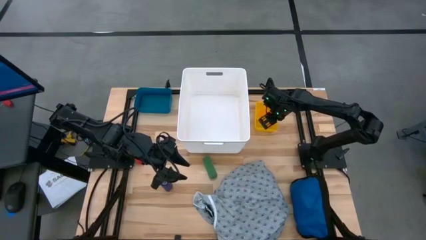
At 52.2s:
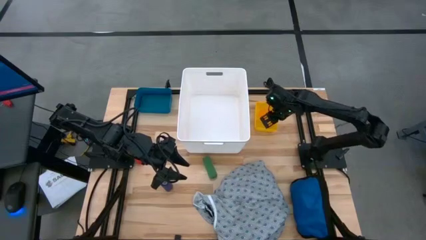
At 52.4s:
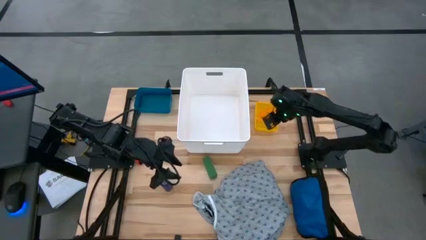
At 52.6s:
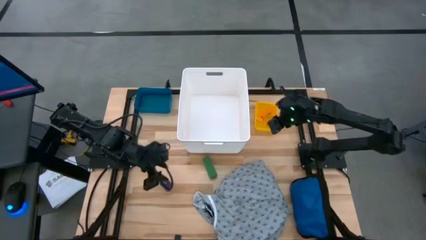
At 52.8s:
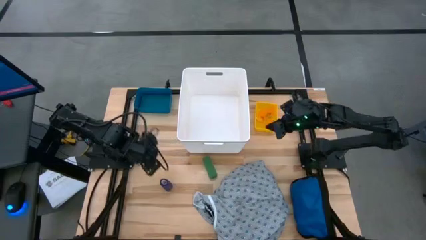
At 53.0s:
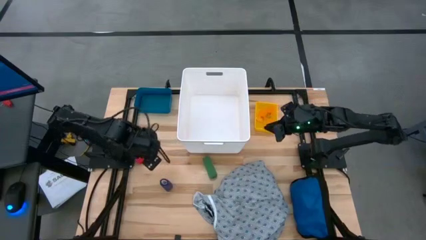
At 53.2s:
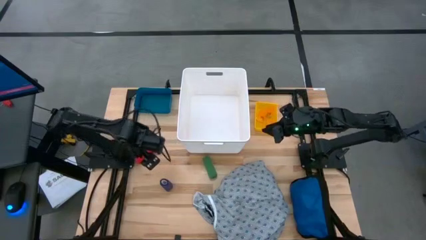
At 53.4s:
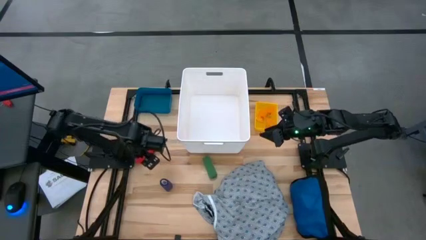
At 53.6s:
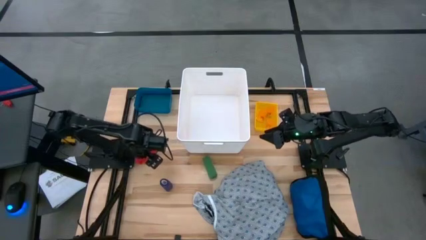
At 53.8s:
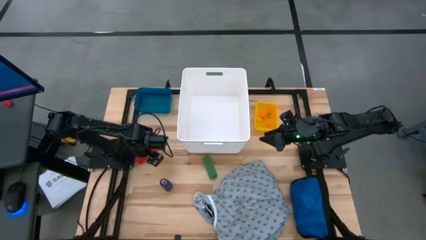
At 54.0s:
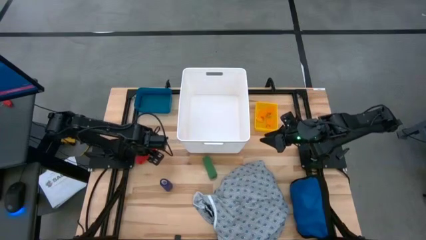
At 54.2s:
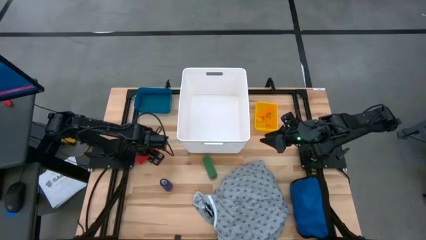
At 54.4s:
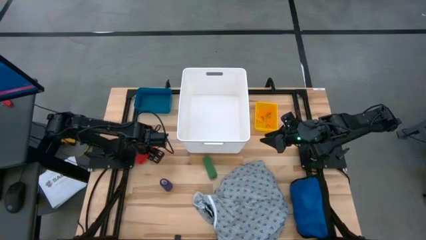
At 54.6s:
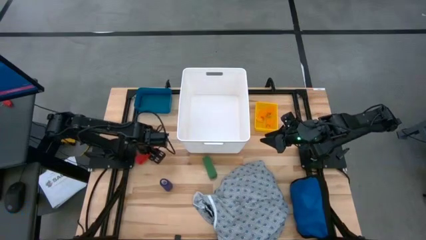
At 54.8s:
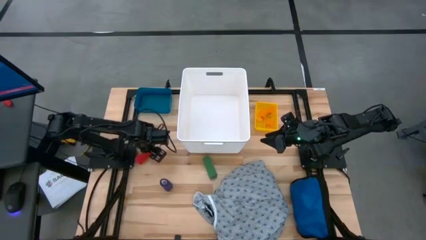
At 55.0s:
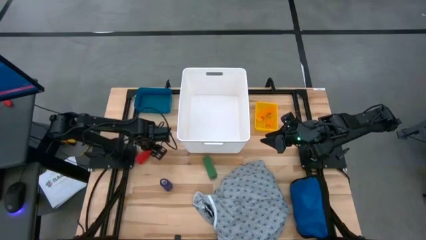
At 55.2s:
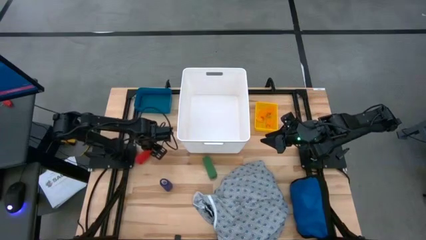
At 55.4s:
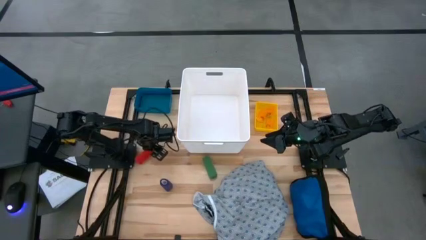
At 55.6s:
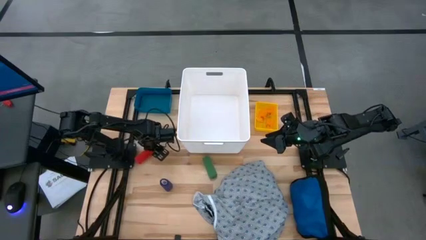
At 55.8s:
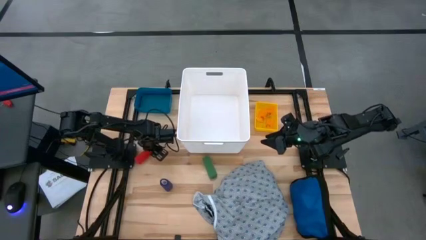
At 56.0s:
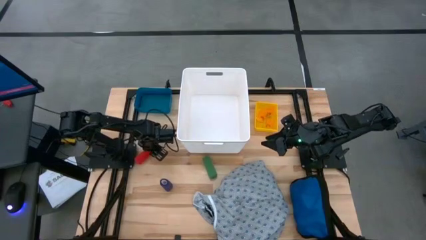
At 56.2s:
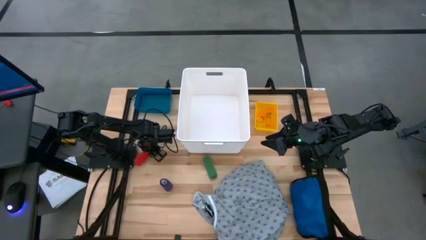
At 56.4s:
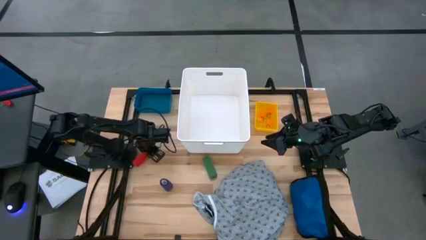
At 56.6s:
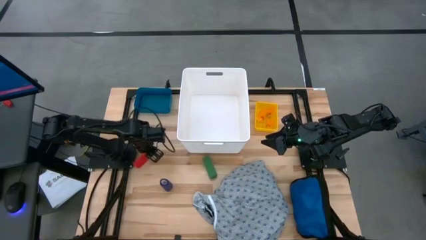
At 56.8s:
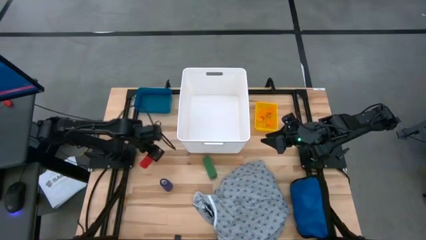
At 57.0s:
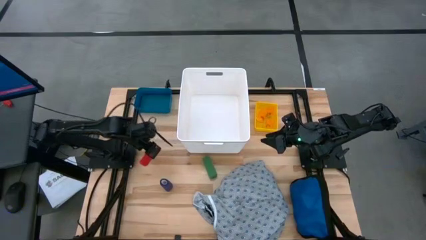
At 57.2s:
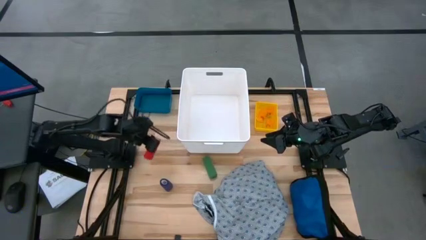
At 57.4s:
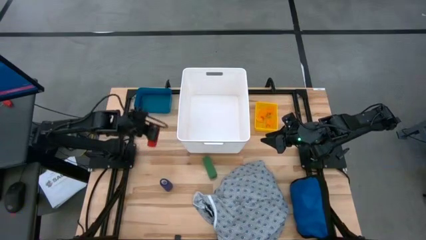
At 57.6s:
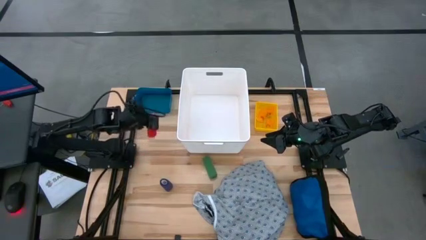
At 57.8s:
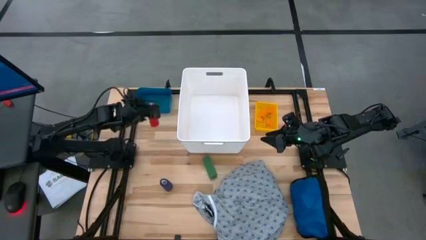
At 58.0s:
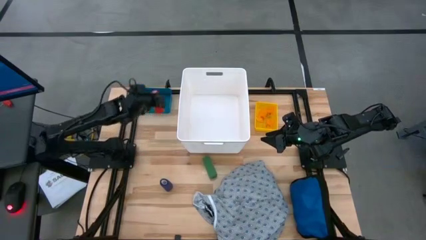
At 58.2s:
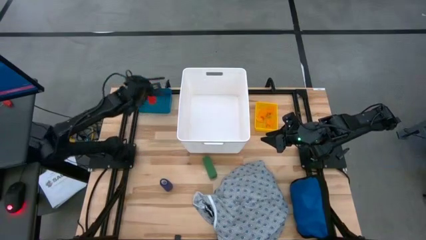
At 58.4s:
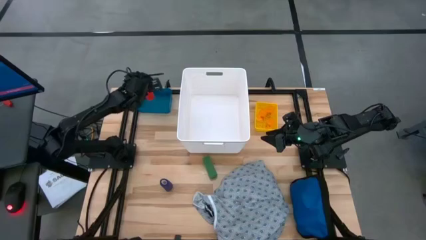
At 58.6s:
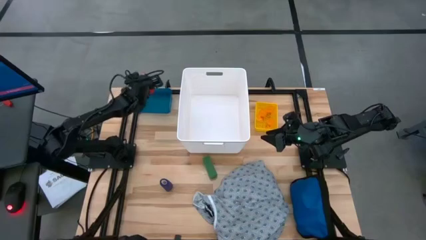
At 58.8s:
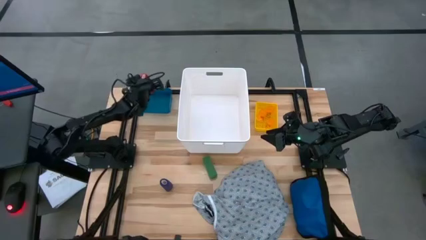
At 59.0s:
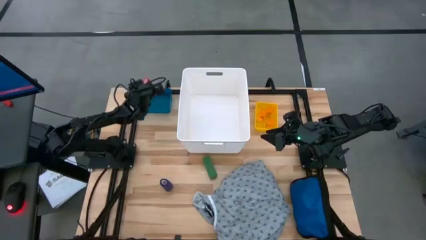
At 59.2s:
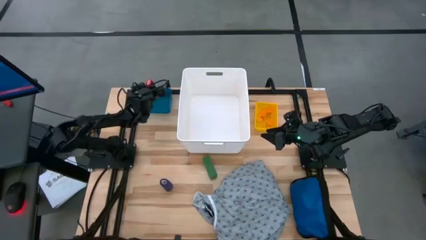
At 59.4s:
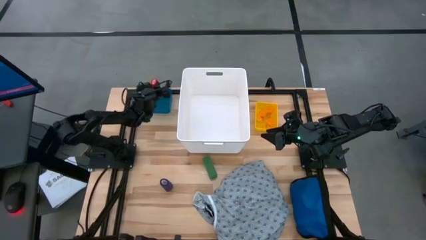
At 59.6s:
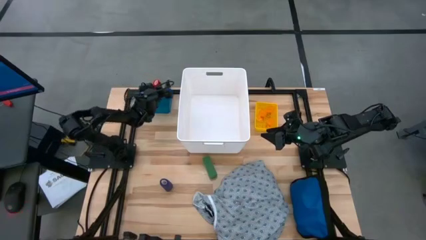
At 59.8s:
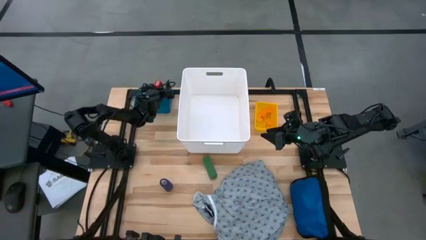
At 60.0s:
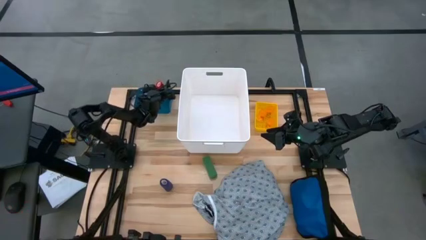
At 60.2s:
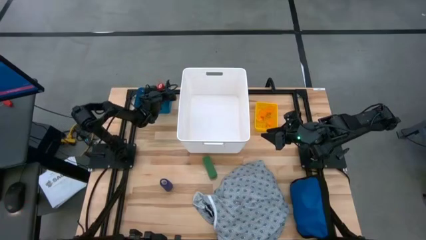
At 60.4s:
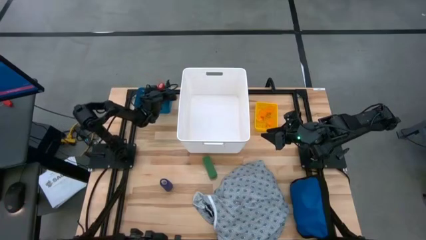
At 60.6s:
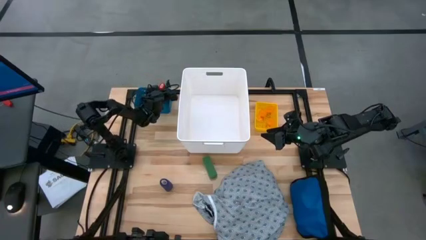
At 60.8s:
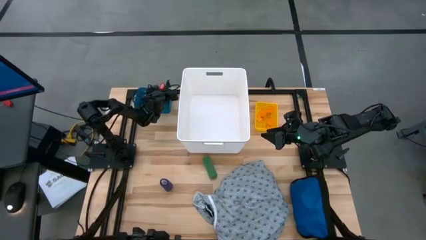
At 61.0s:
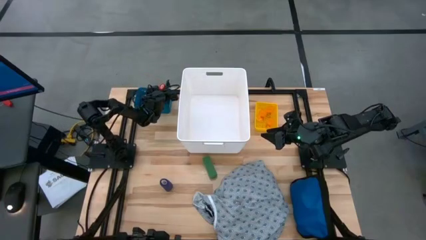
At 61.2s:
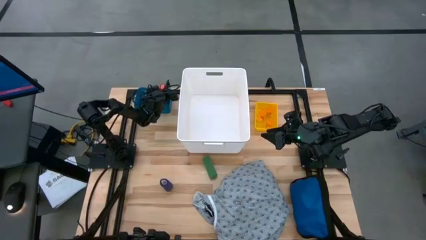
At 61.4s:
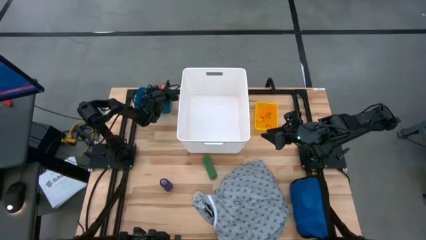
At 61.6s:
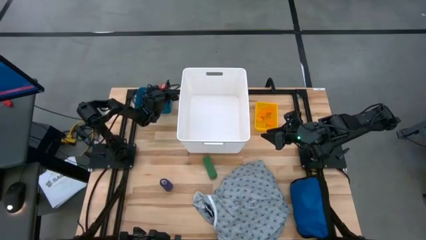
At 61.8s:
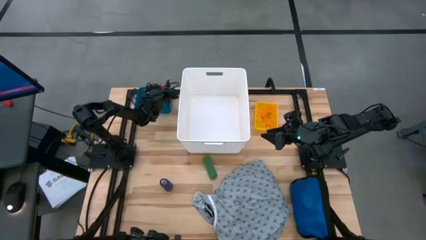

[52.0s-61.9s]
Task: Pick & place medical supplies in basket/bin
Put the red bandage into the blue bin

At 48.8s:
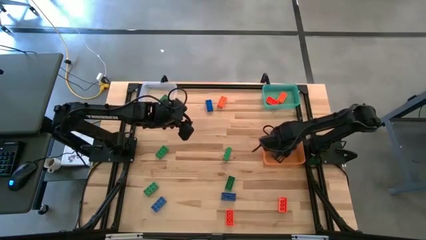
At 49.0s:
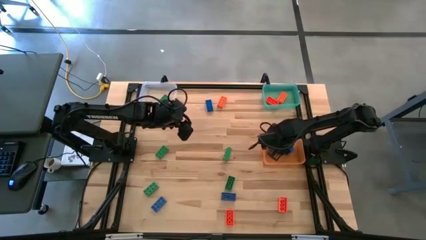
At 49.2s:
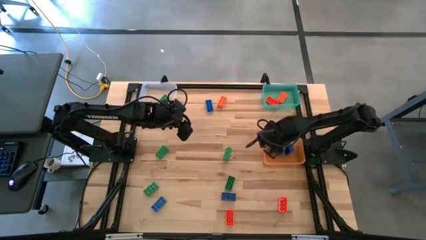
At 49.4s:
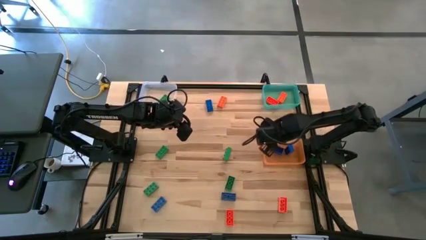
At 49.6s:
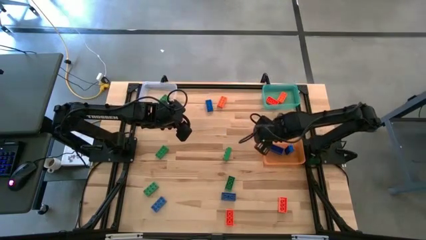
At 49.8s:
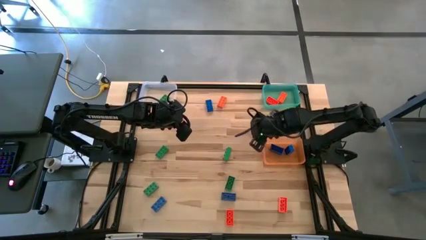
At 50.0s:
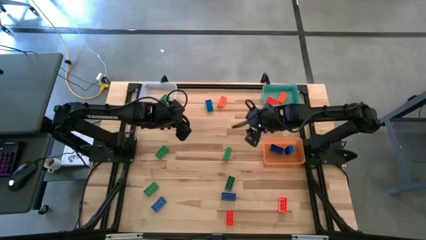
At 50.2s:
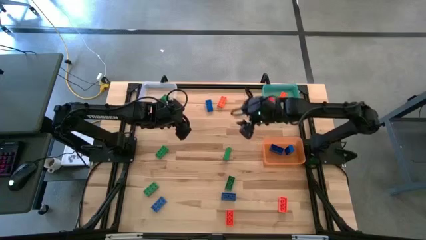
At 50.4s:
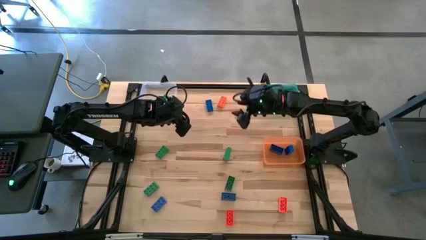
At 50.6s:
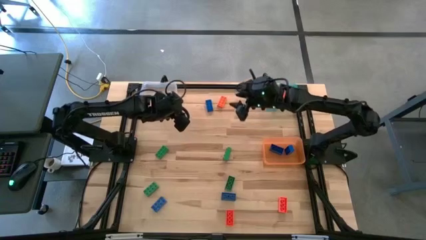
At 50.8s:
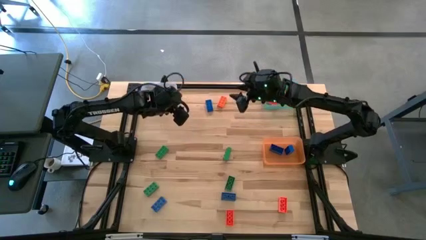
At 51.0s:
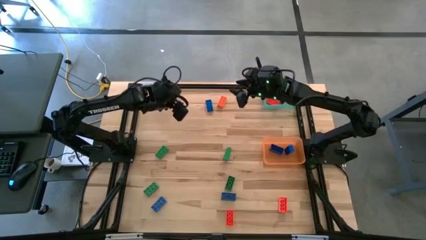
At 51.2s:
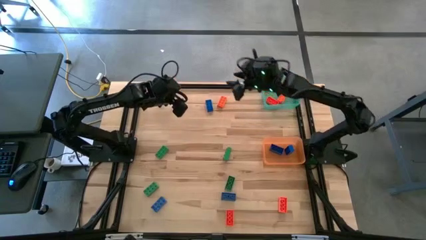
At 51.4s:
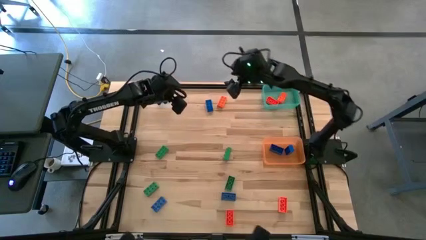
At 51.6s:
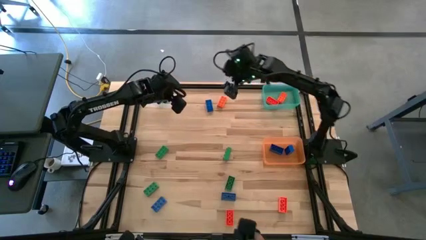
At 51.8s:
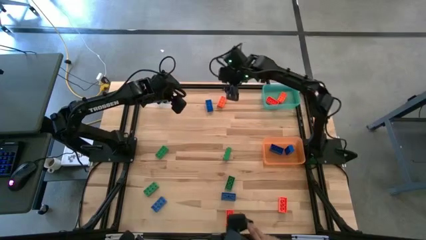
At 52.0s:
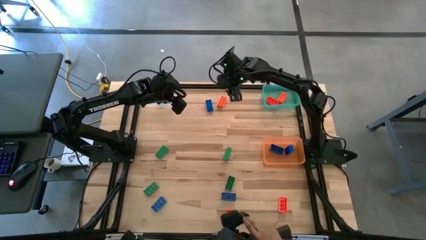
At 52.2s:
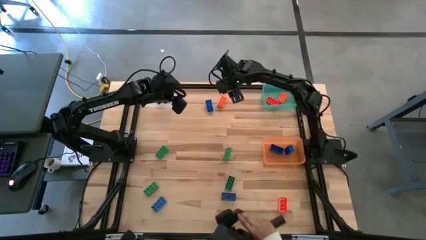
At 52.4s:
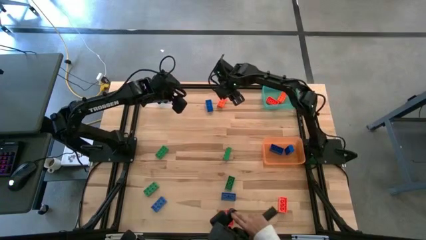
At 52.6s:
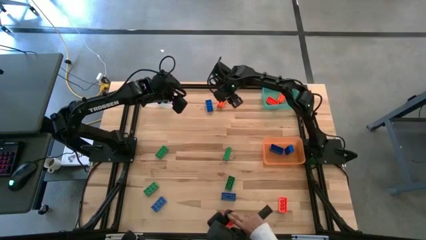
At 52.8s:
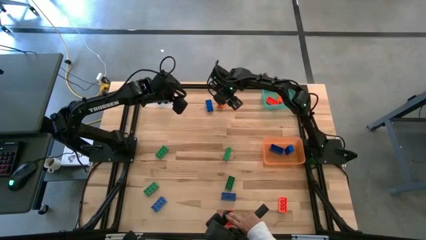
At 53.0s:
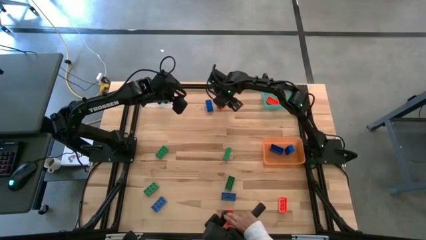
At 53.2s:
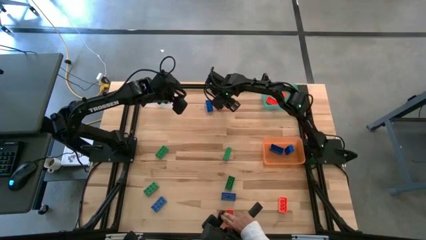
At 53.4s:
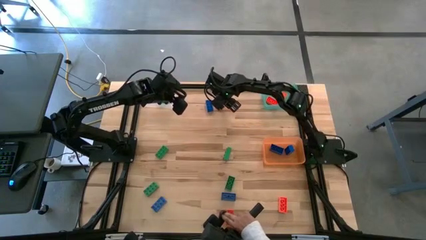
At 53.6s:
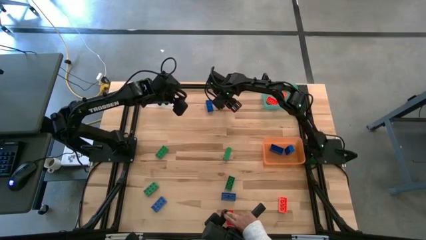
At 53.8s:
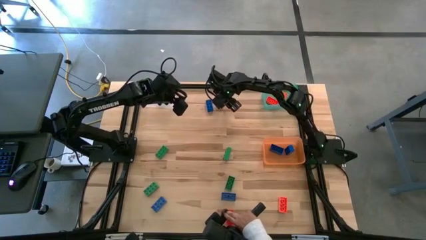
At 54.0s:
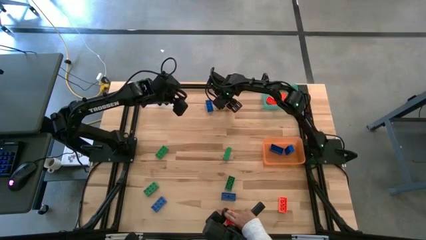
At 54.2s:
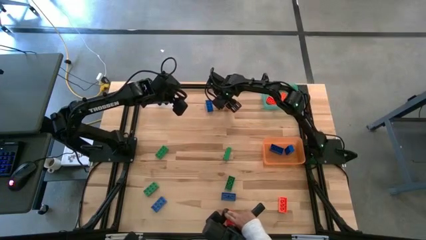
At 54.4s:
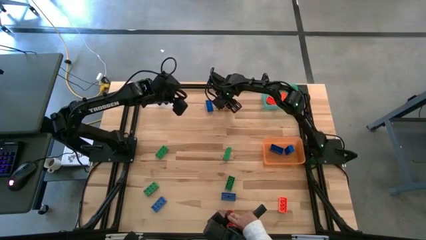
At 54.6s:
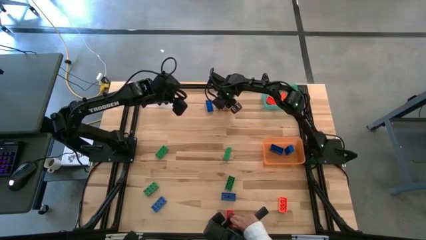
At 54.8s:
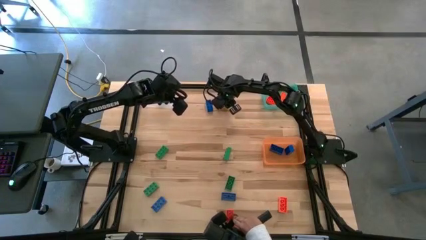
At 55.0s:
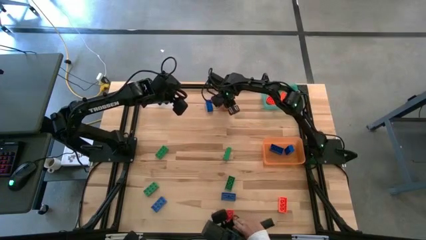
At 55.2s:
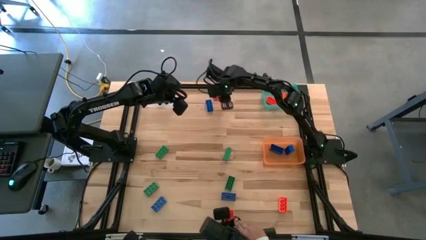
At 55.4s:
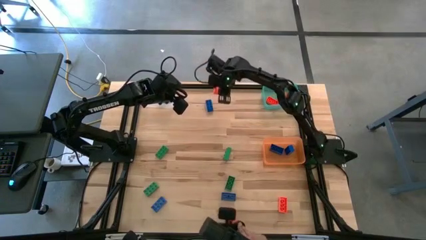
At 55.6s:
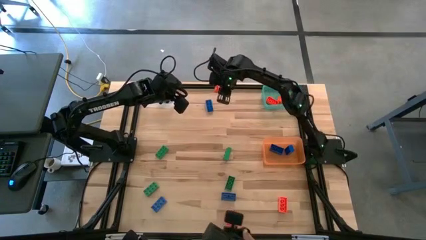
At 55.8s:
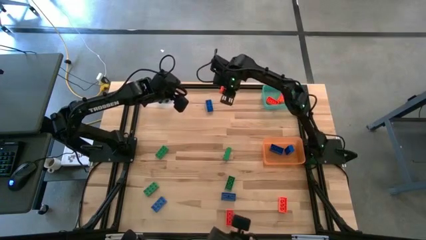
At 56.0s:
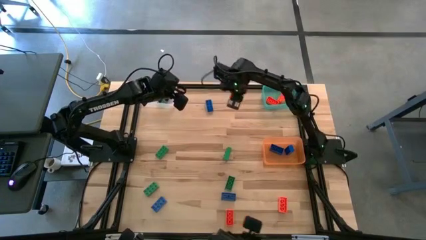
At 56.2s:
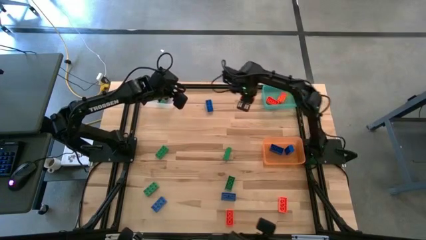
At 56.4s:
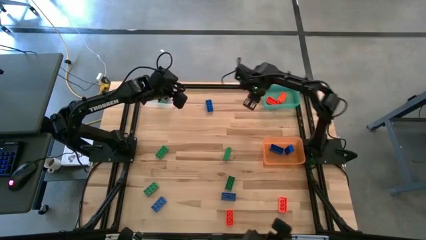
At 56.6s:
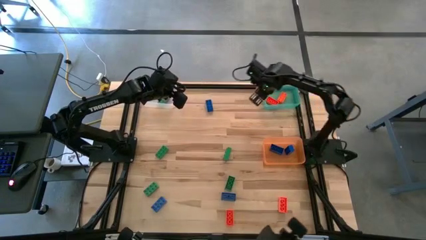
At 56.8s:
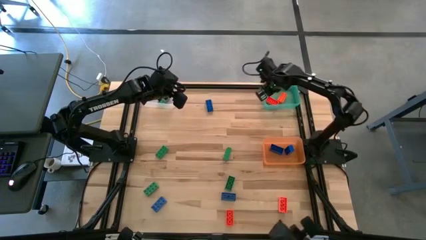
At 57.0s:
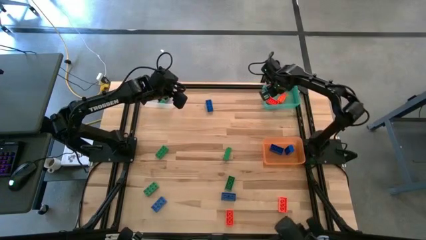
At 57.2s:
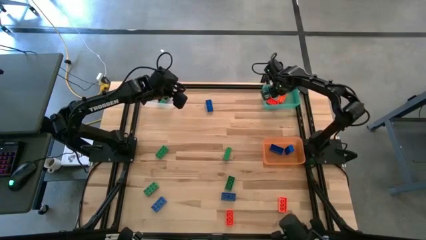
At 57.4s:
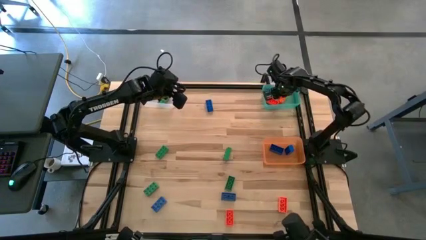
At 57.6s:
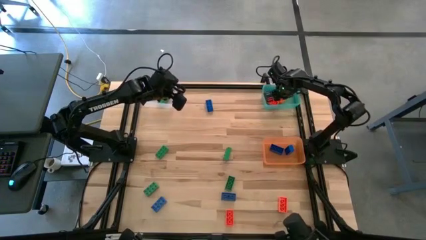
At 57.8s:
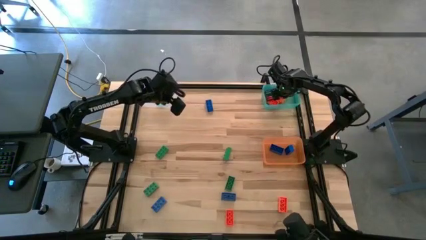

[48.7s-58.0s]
Task: Sort & place blocks by color
Put the orange game piece into the blue bin
